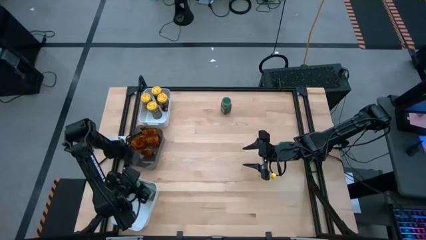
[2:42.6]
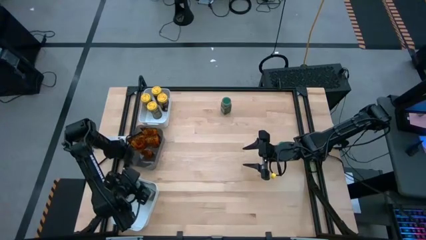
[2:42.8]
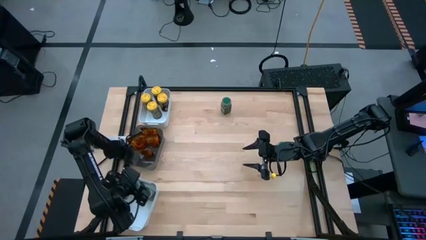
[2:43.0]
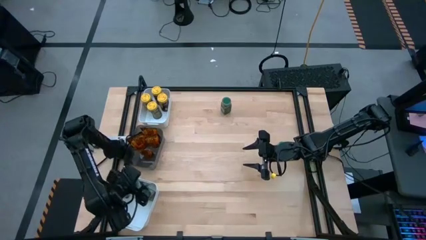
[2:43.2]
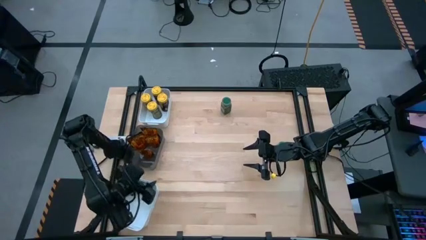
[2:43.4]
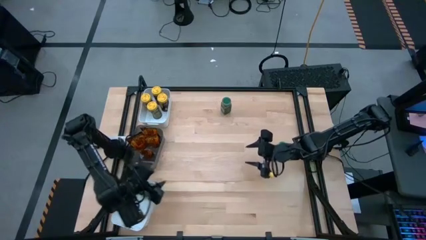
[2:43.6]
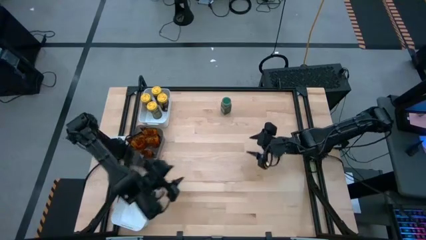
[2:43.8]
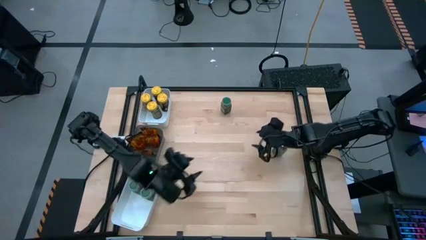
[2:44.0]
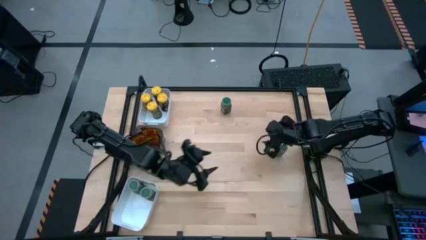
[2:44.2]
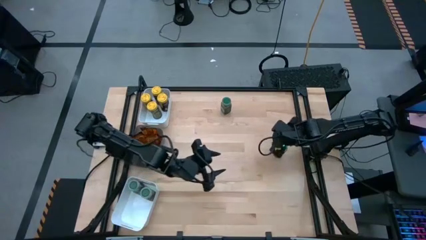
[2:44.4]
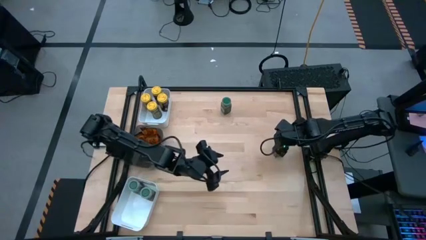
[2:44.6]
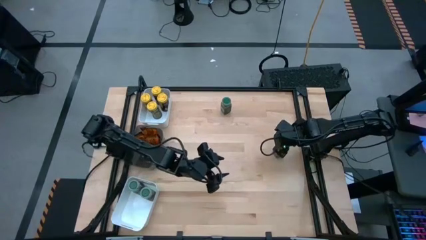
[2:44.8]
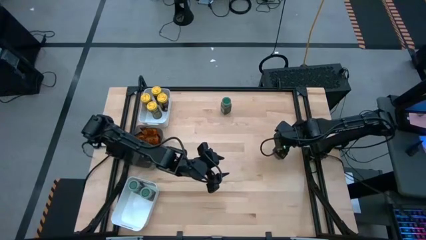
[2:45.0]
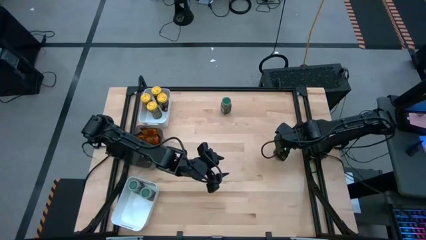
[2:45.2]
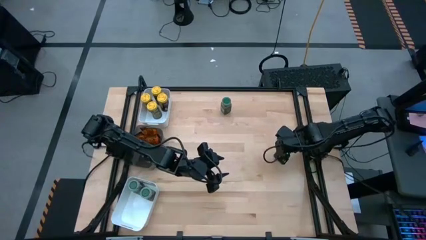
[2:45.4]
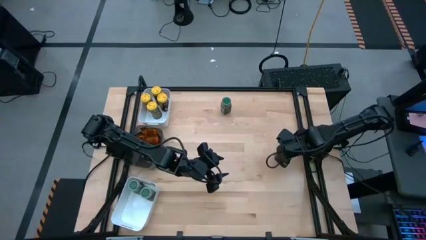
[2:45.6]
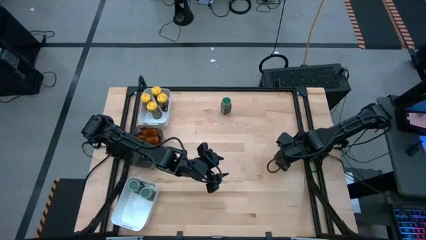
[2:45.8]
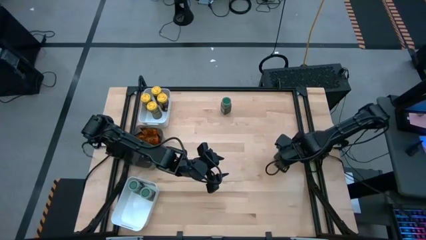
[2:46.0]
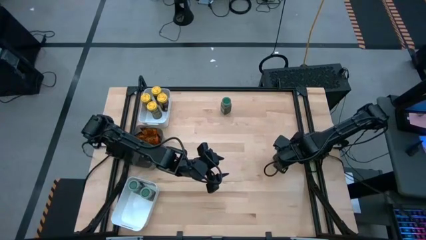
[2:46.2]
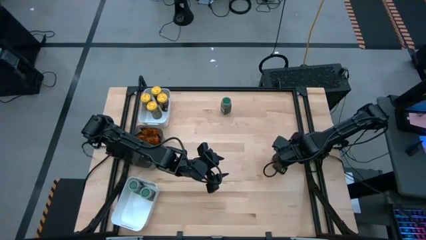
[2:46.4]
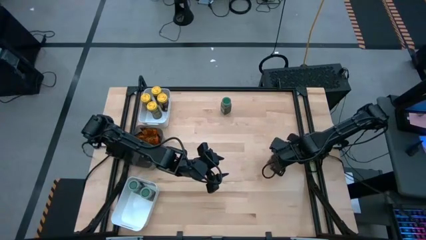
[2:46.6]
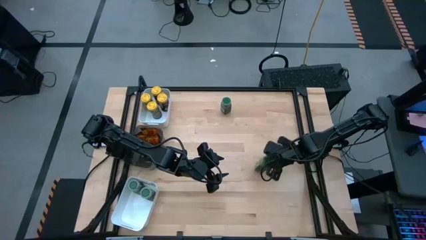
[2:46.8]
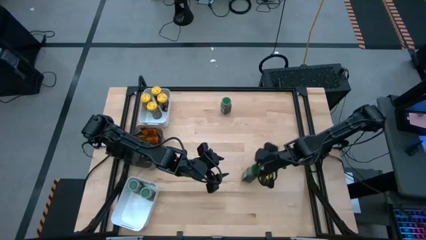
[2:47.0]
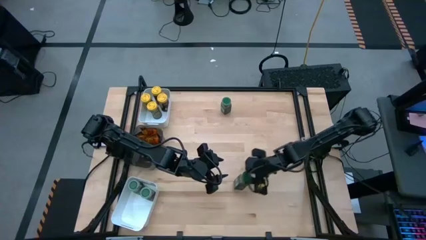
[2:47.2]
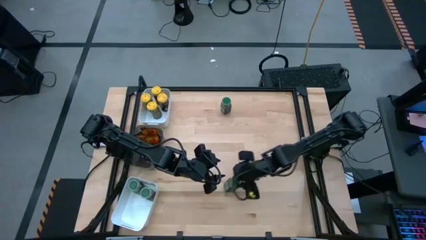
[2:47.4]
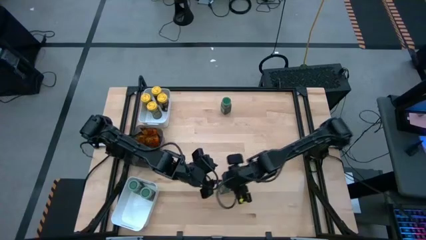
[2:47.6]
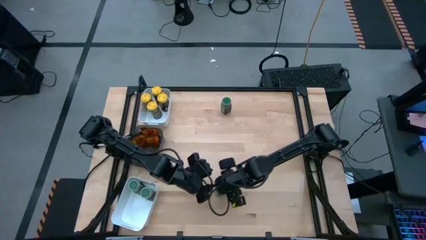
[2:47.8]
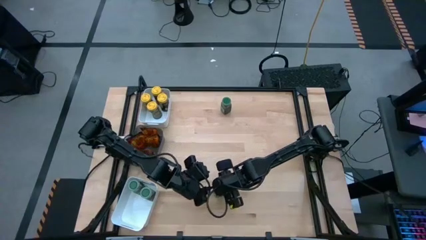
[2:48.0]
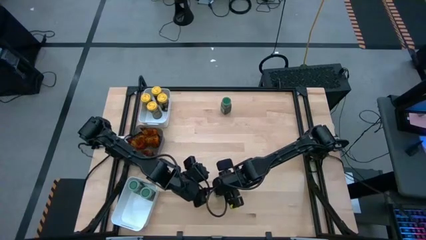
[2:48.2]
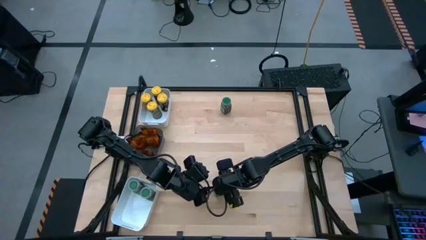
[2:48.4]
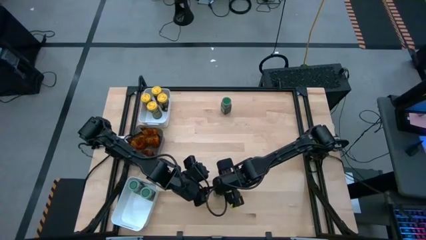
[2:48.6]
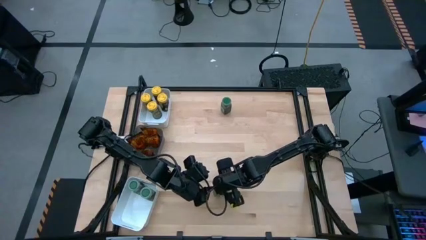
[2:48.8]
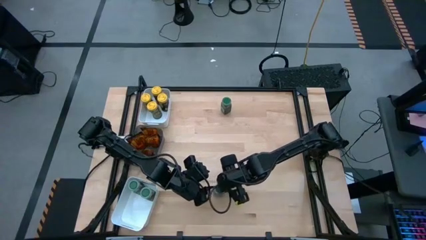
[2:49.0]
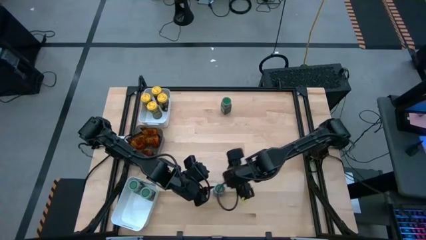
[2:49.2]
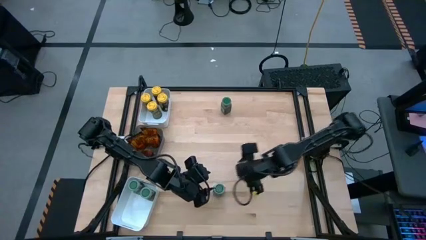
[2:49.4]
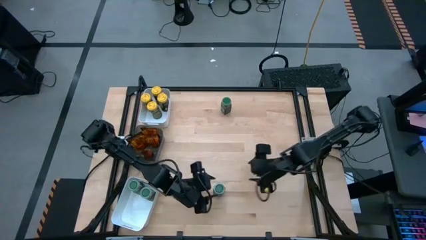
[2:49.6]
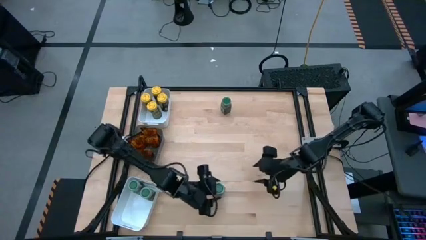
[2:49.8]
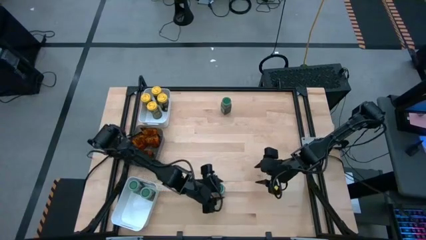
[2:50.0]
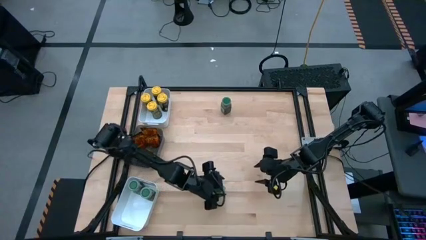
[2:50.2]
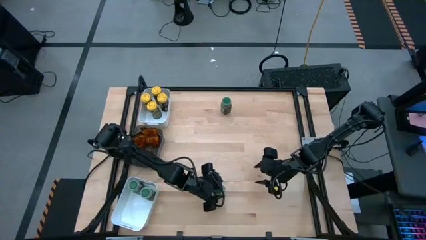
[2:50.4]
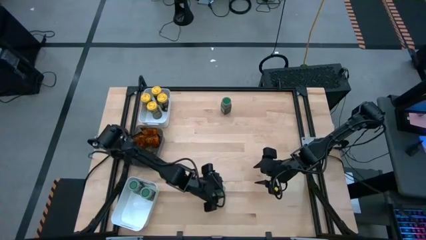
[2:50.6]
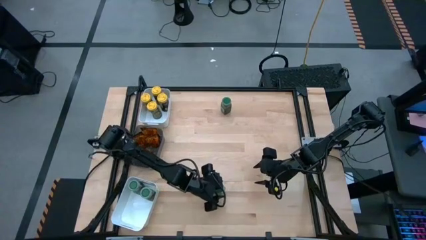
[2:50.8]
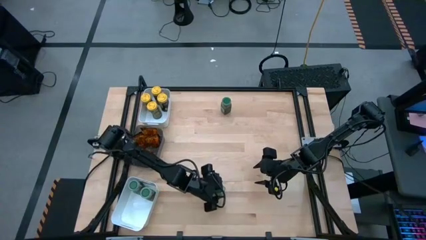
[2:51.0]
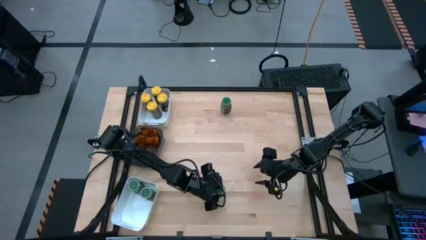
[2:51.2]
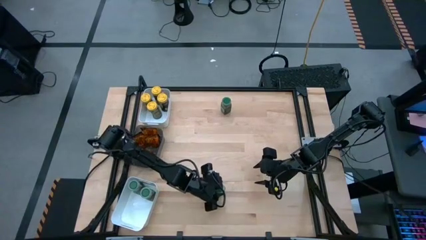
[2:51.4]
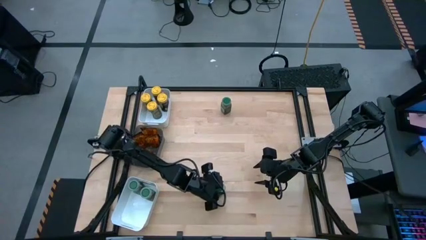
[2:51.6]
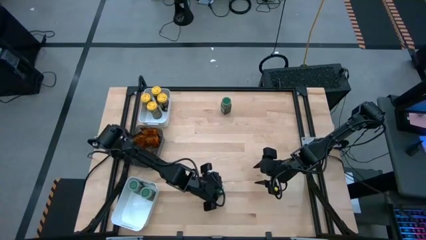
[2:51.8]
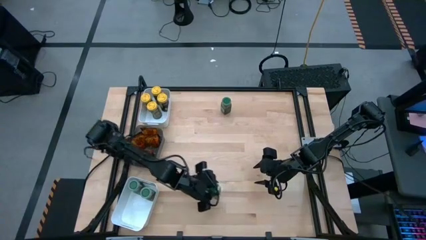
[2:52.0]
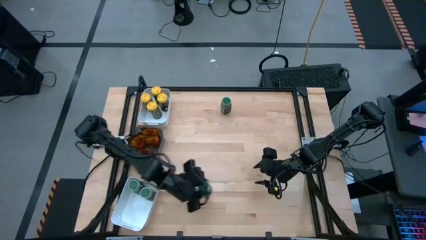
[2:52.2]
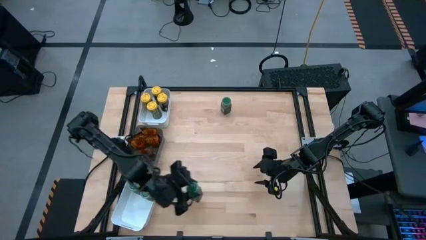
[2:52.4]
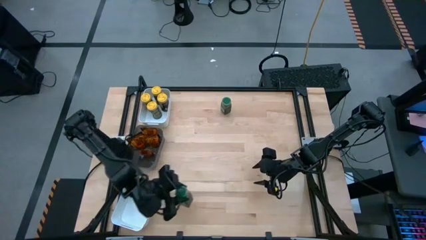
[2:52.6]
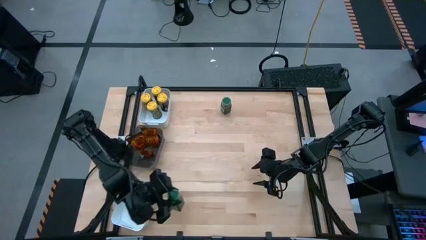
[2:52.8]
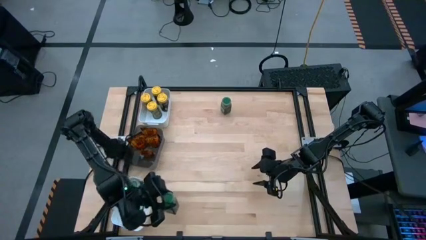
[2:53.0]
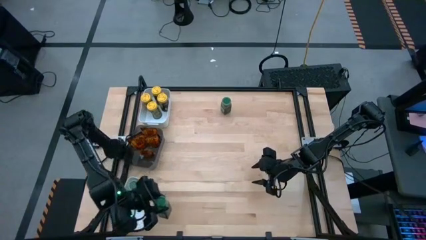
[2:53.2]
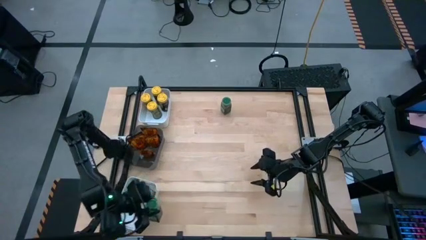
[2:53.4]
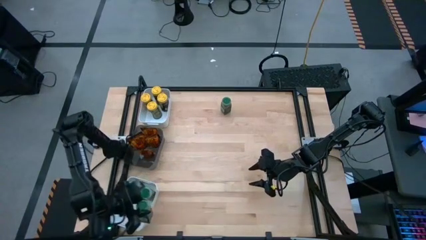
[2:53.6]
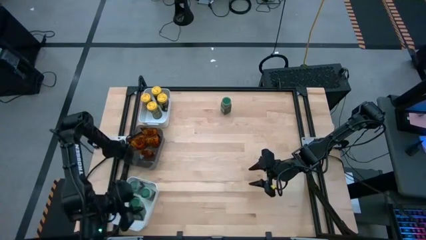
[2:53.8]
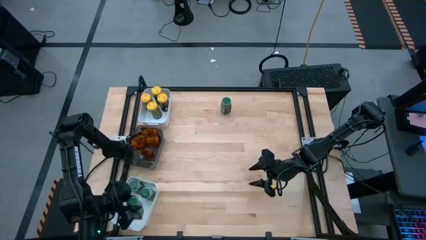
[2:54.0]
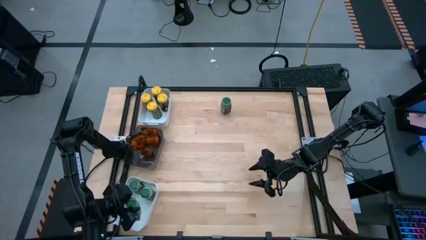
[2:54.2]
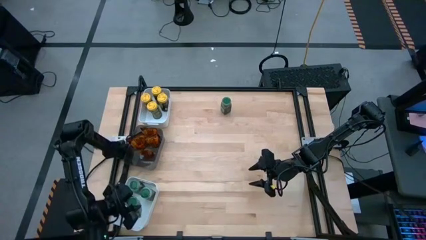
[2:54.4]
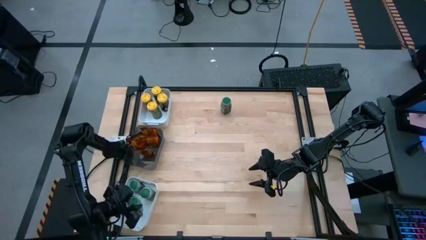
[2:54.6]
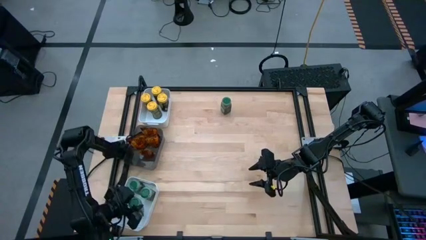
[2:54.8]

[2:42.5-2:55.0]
Task: Sort spices by type
Put the right green seasoning bottle into the bottom white bin
